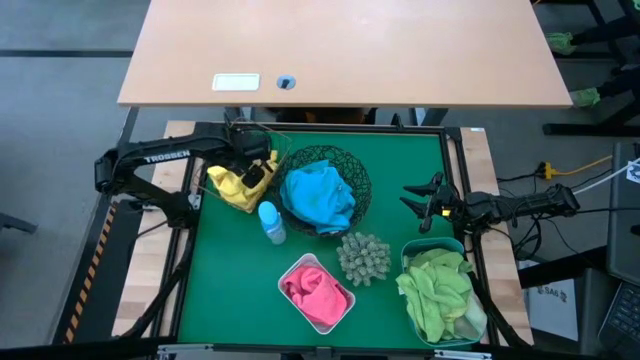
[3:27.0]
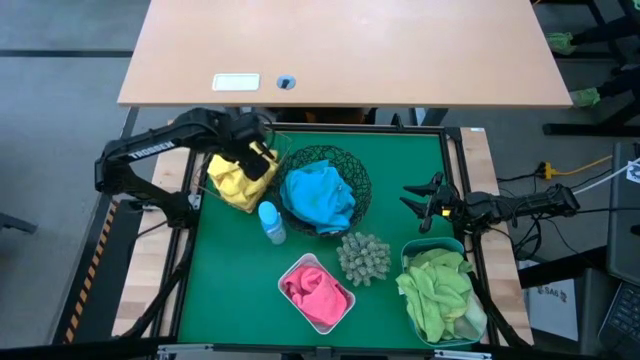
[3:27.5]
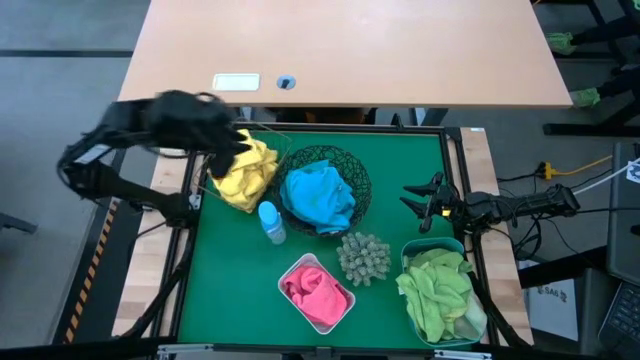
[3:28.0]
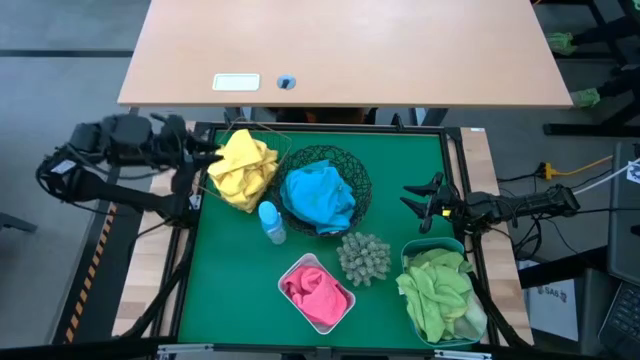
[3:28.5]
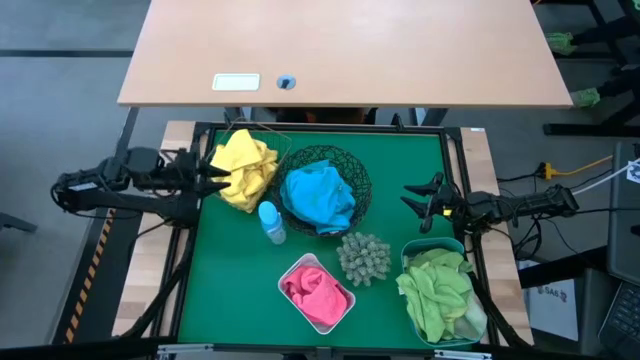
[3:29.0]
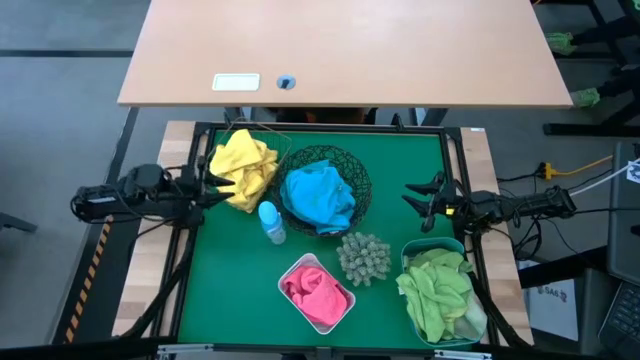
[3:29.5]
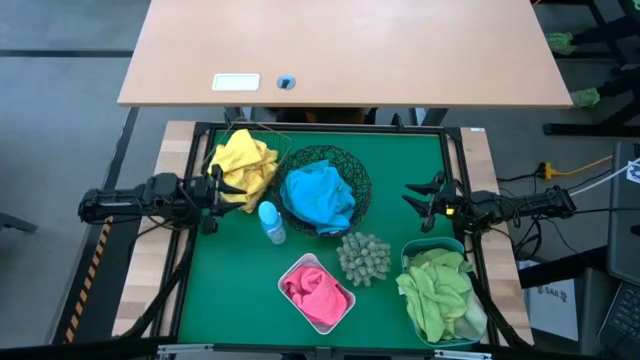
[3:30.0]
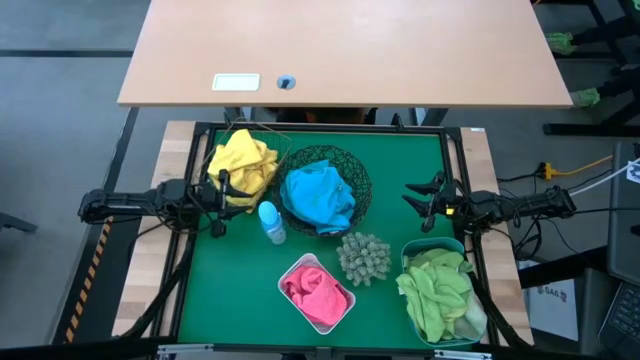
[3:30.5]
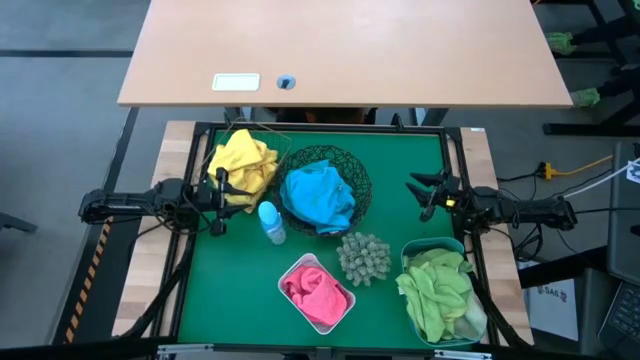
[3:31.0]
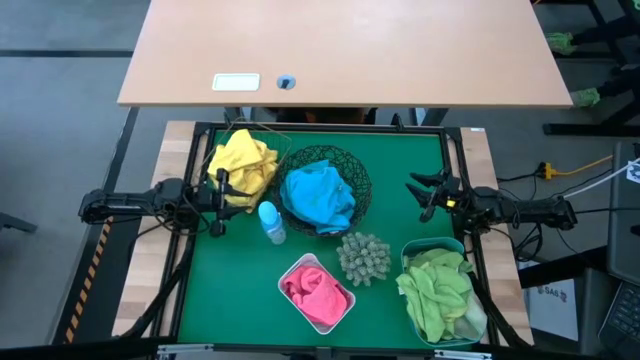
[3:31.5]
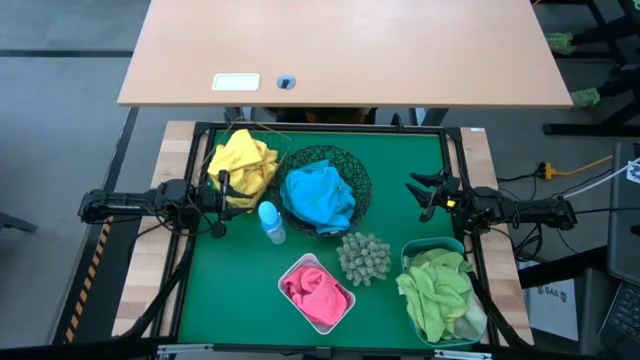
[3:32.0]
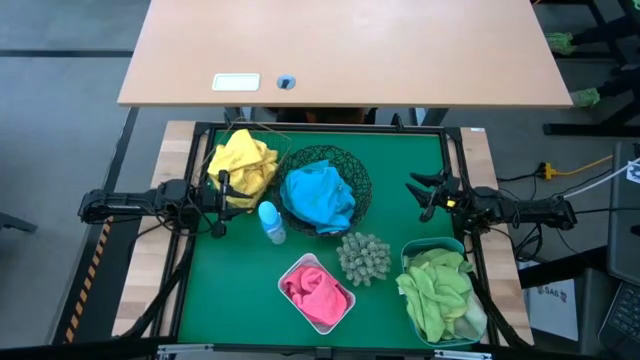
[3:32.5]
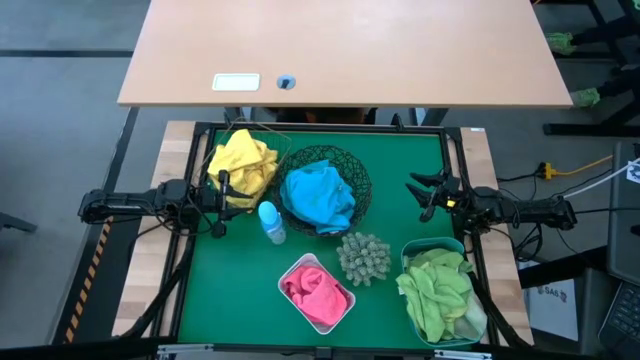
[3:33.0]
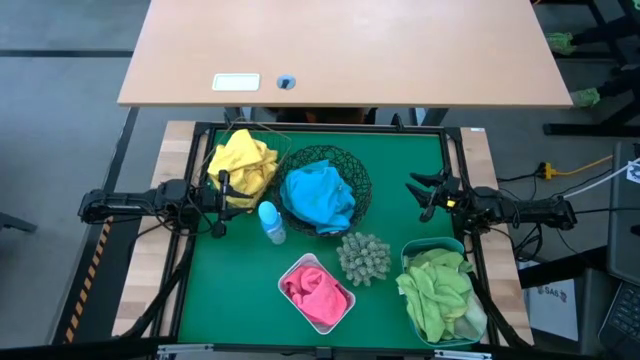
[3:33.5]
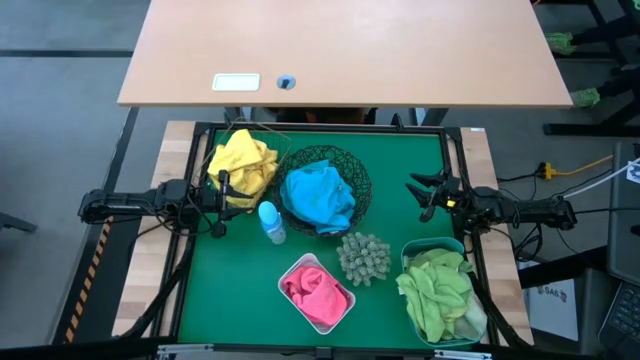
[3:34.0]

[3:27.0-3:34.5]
Task: Sort microfiber towel by color & place in baskets
Return to Home Position

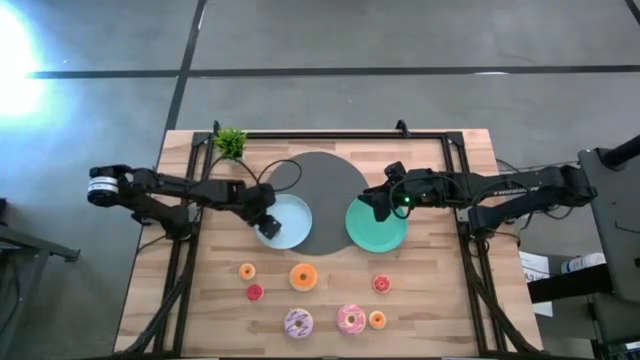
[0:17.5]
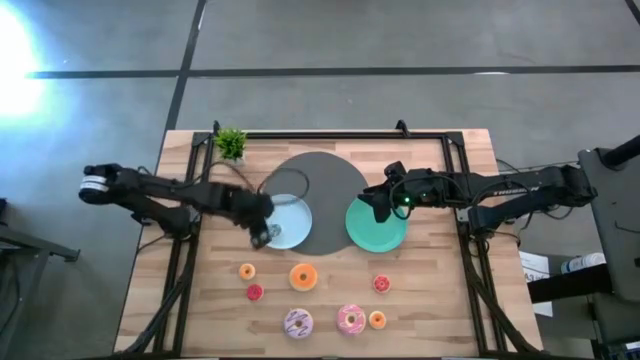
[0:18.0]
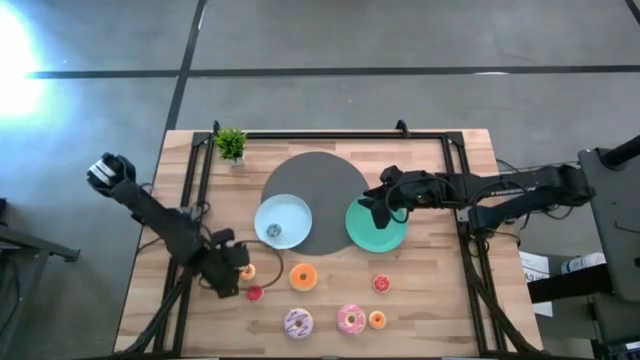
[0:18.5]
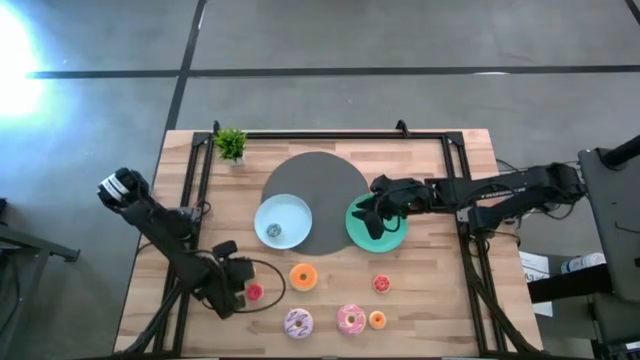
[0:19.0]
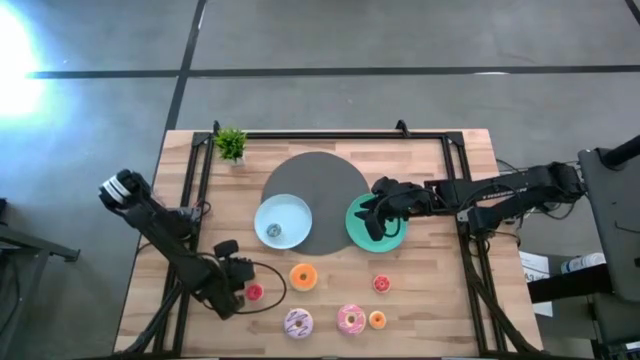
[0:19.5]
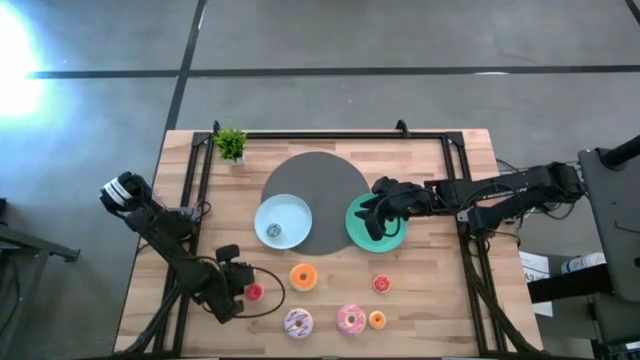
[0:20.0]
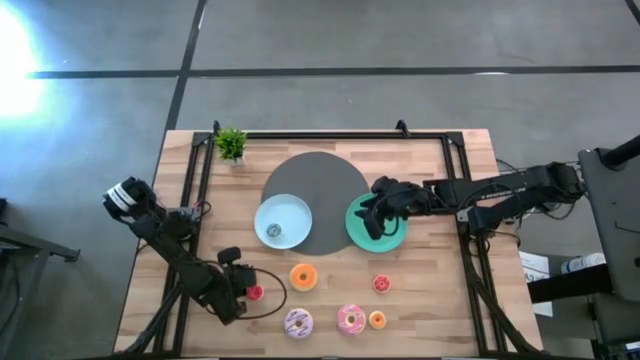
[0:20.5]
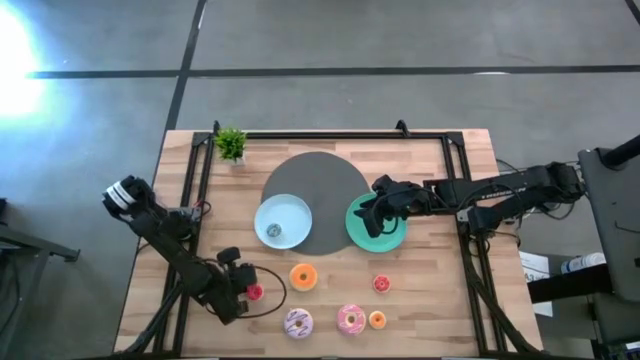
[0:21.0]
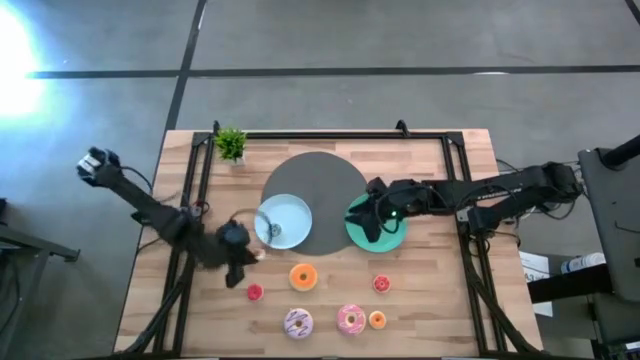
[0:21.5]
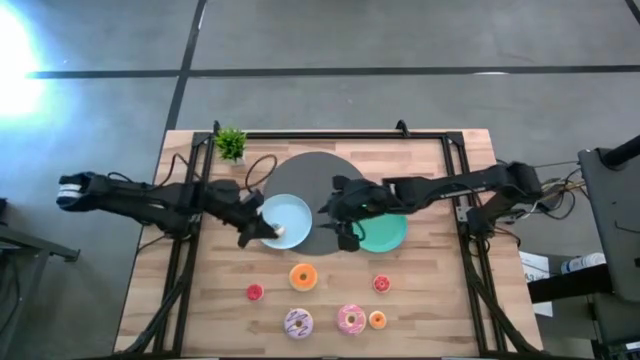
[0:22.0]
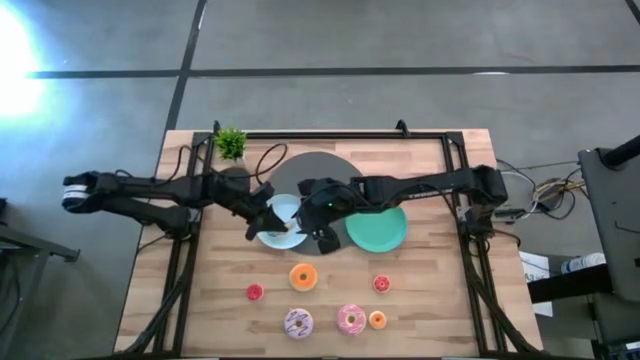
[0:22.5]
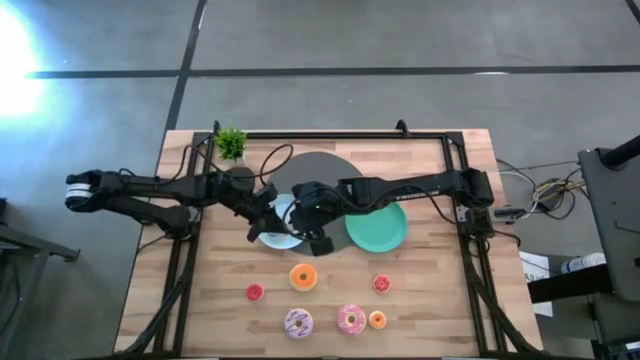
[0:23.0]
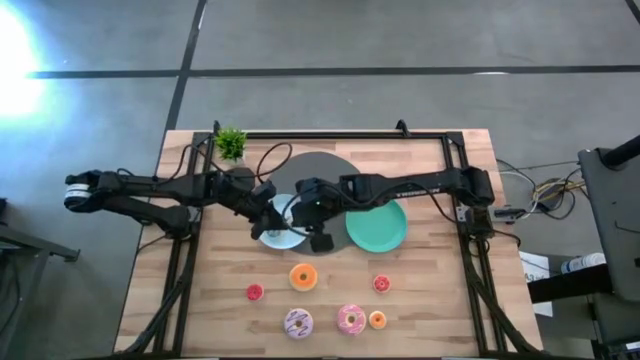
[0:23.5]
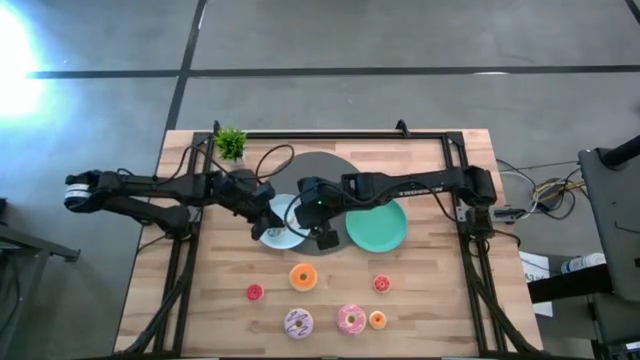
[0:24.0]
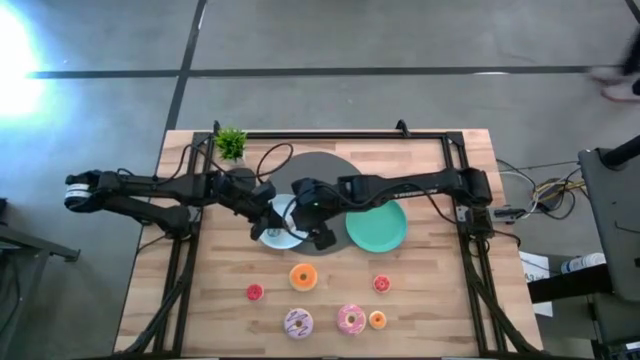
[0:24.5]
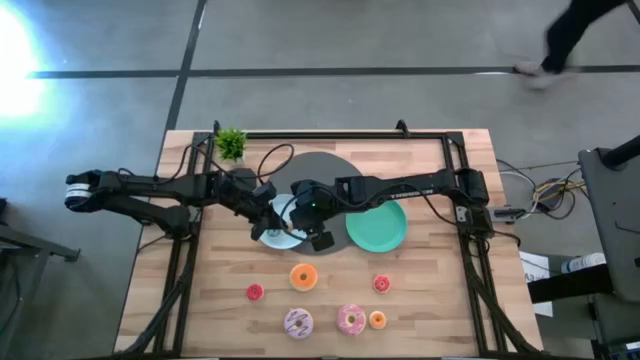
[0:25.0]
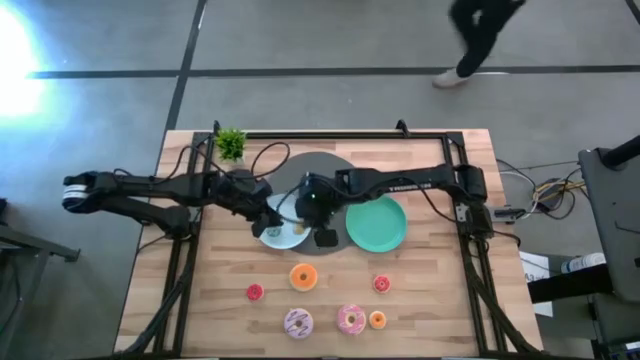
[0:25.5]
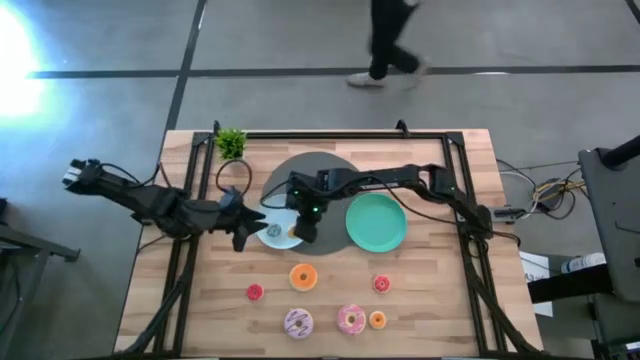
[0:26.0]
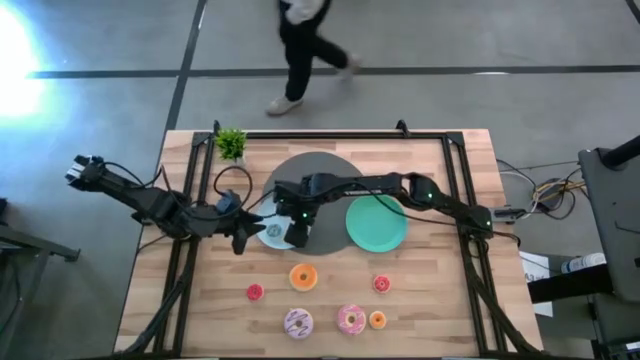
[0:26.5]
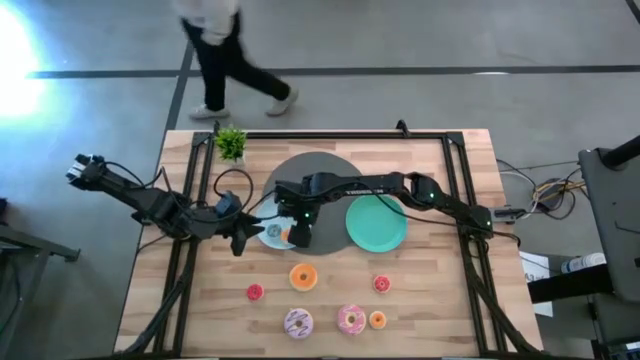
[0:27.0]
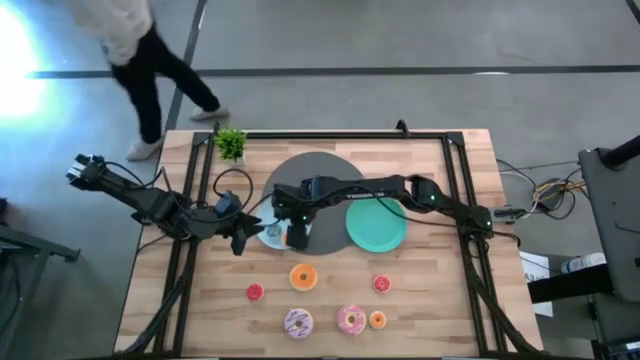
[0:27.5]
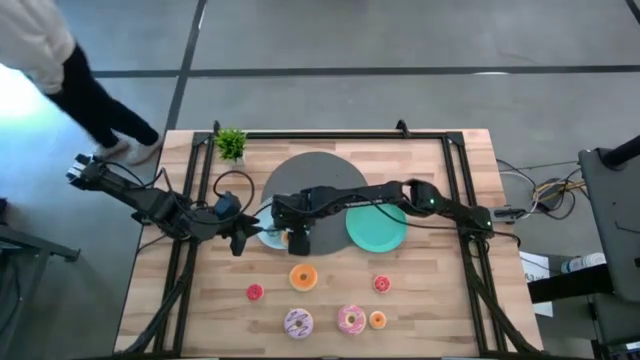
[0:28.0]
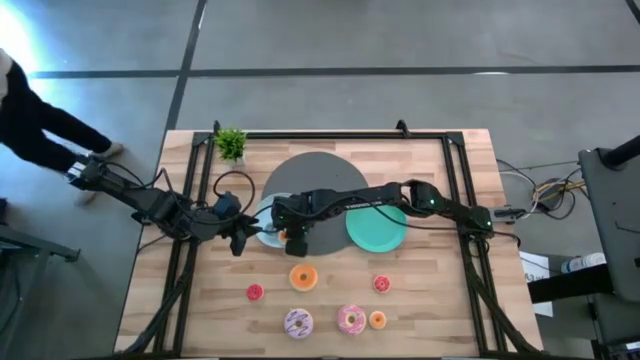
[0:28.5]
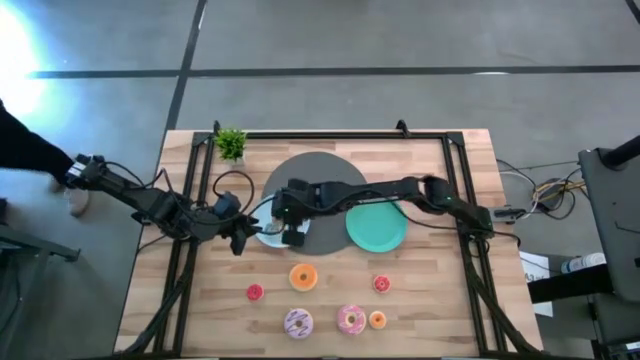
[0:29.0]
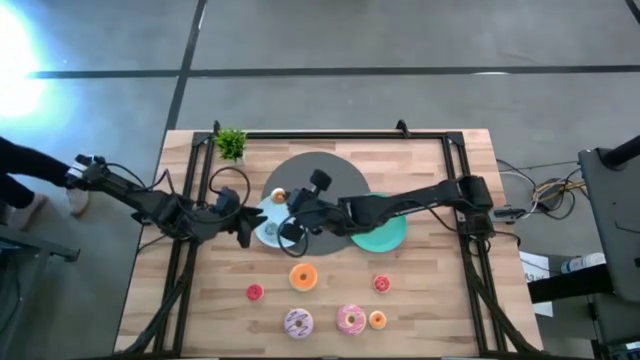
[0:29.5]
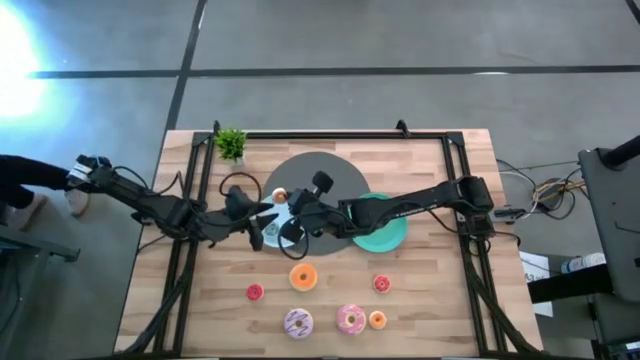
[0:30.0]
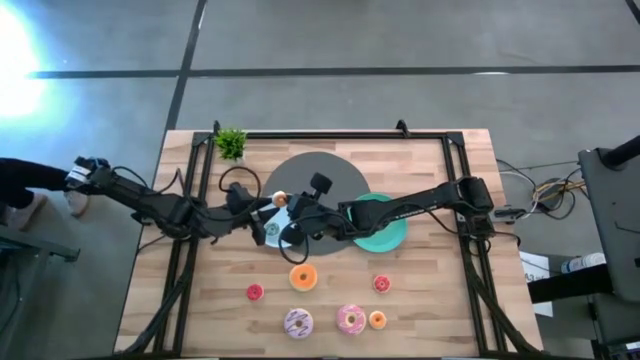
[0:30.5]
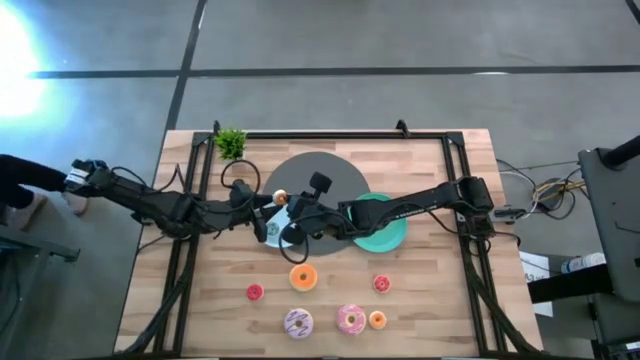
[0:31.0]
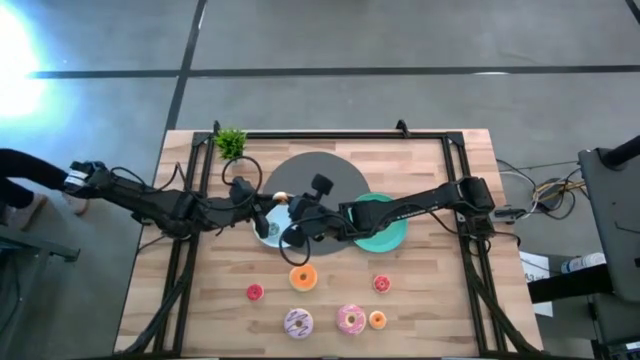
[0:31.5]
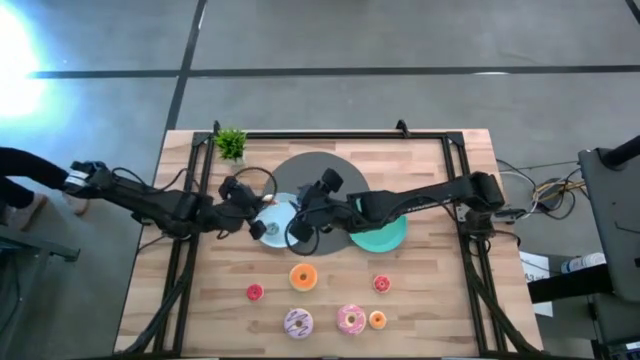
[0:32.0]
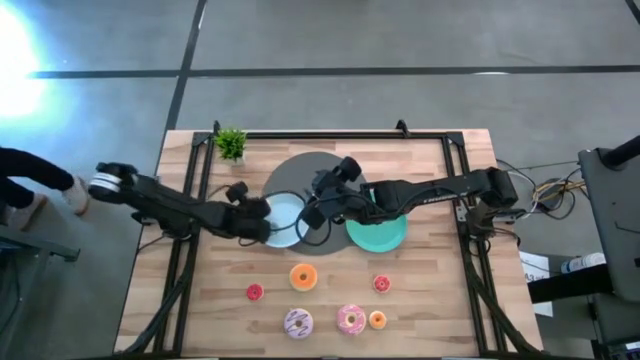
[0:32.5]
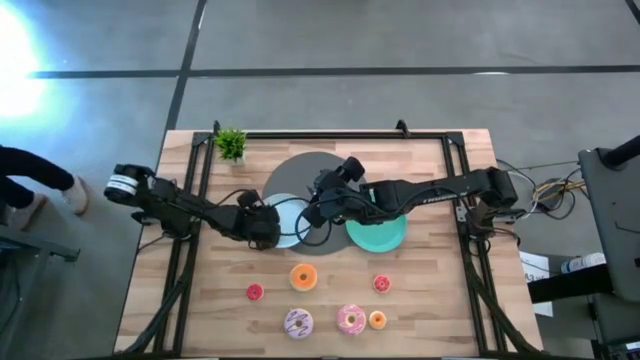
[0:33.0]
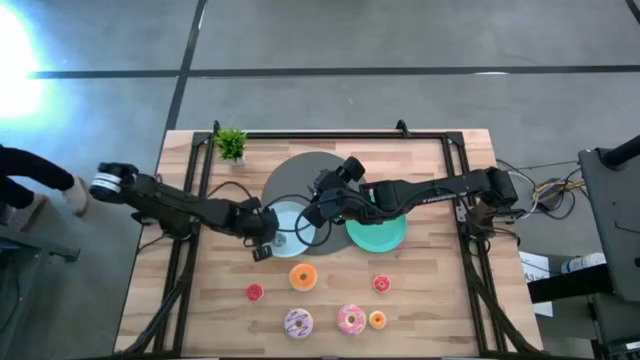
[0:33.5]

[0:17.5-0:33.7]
Task: Pick & Place donuts
Put the top small orange donut on the light blue plate
